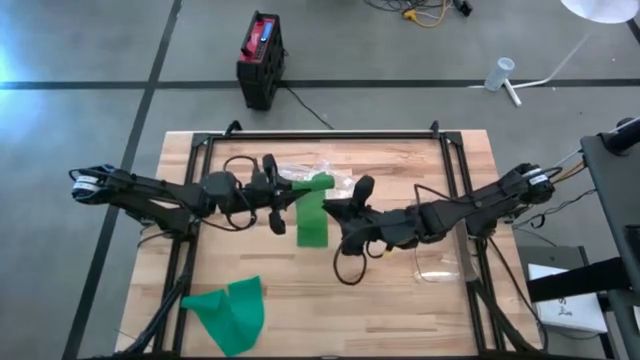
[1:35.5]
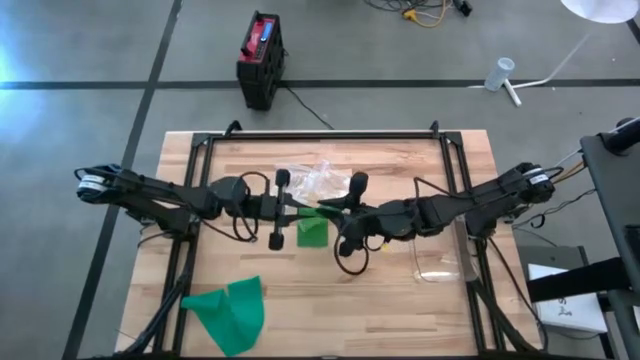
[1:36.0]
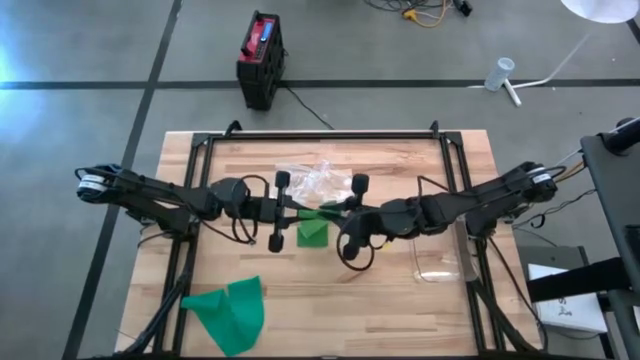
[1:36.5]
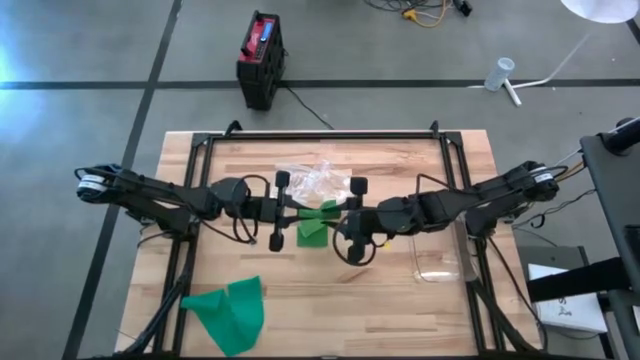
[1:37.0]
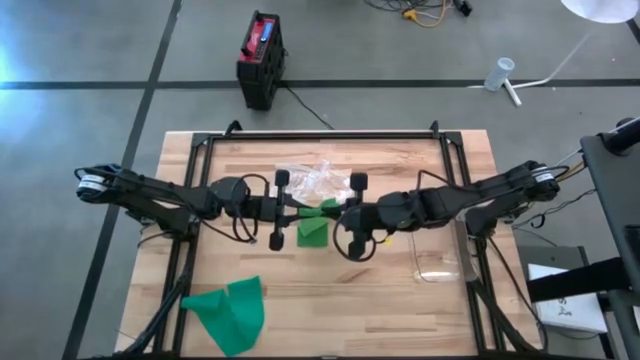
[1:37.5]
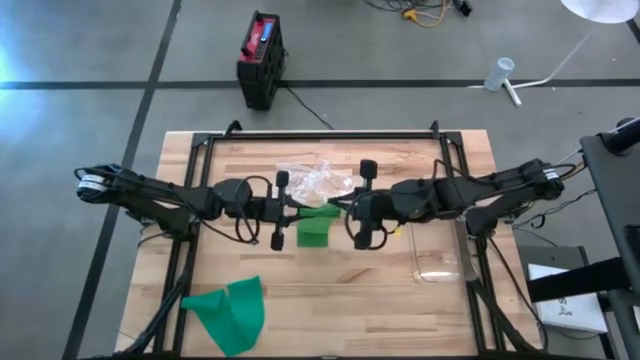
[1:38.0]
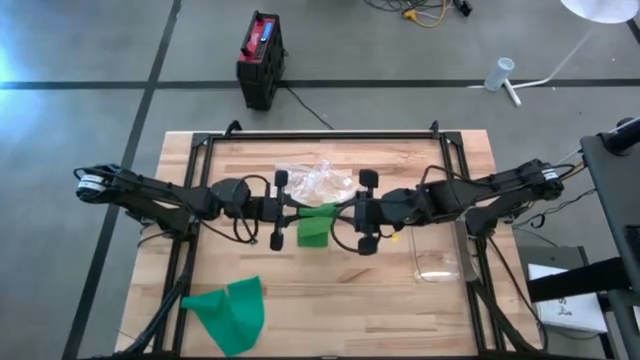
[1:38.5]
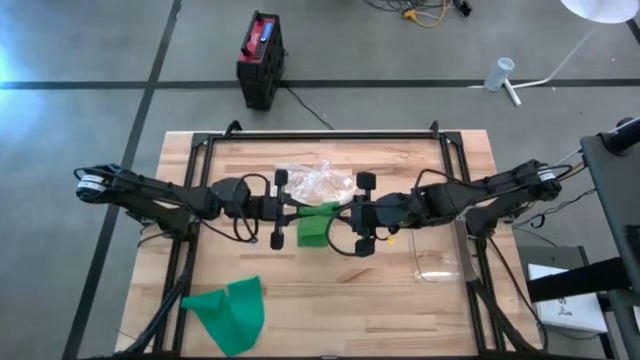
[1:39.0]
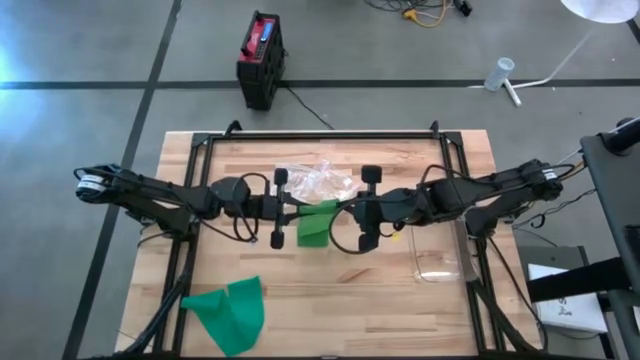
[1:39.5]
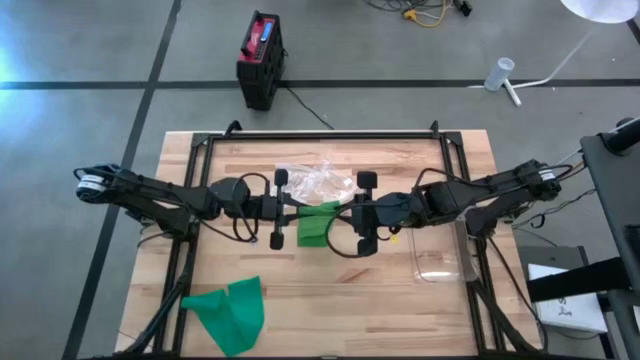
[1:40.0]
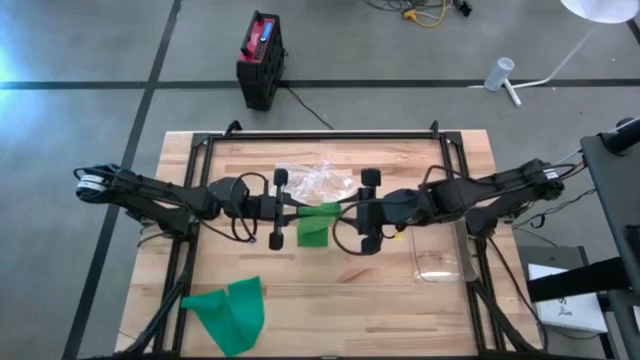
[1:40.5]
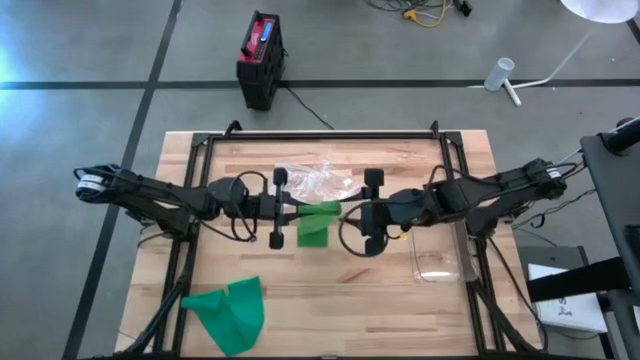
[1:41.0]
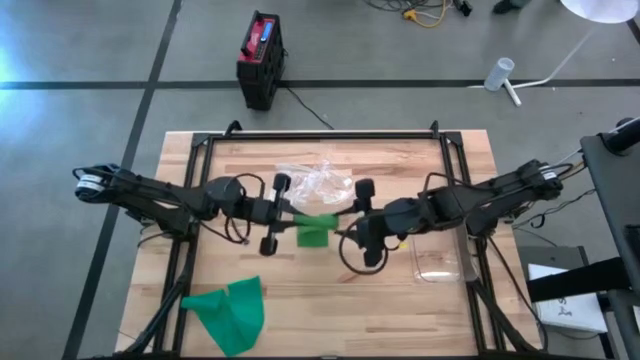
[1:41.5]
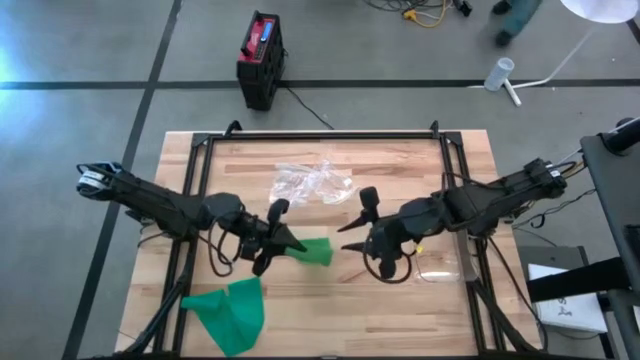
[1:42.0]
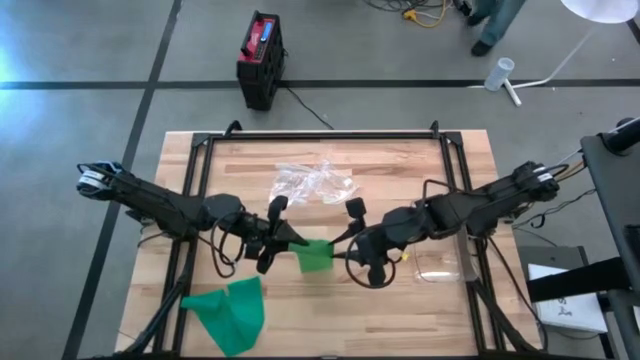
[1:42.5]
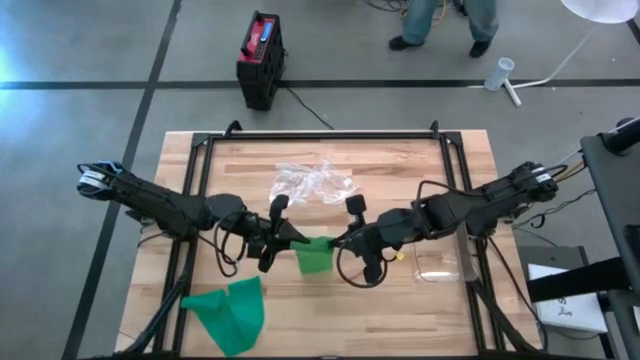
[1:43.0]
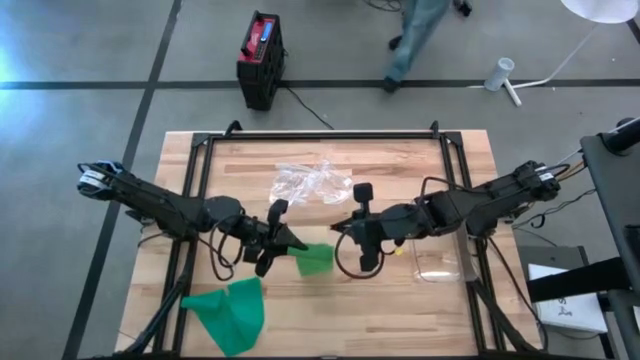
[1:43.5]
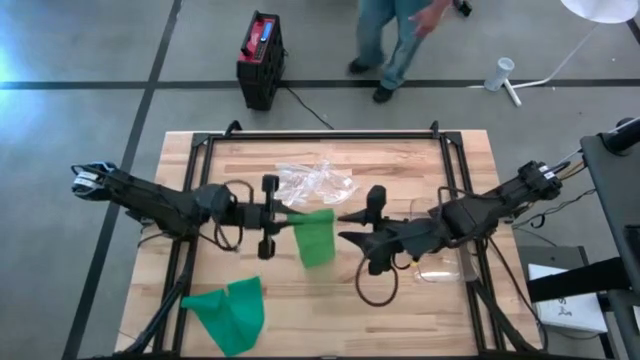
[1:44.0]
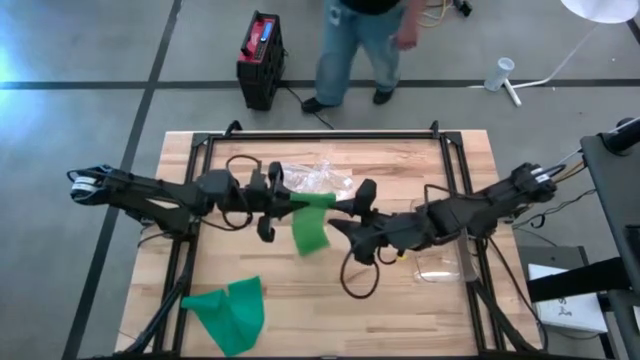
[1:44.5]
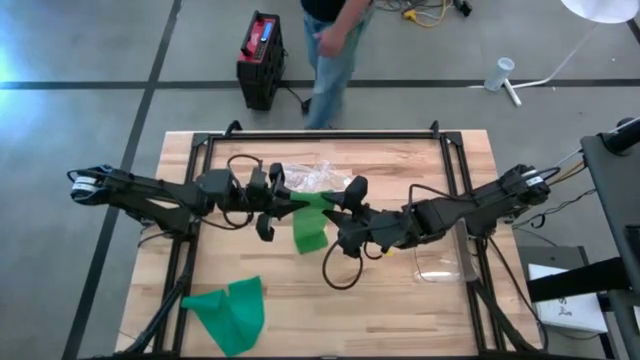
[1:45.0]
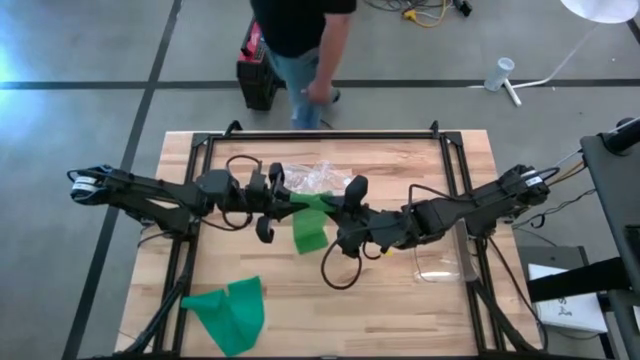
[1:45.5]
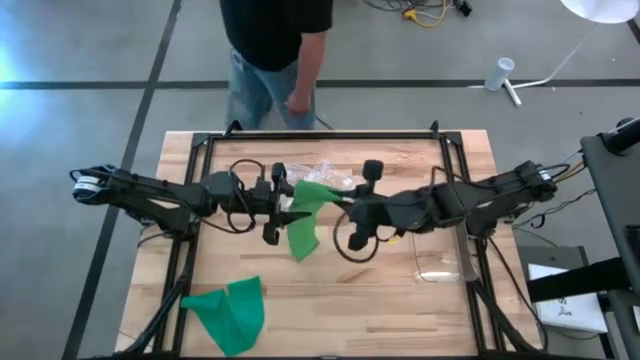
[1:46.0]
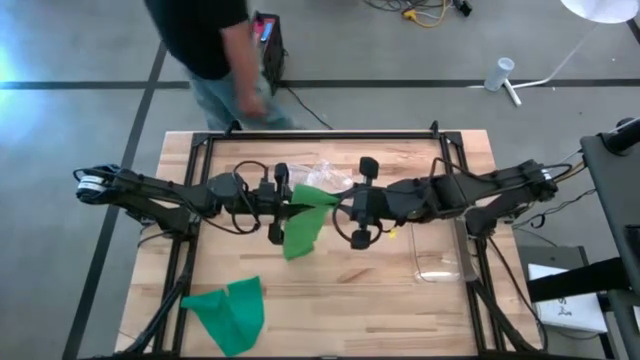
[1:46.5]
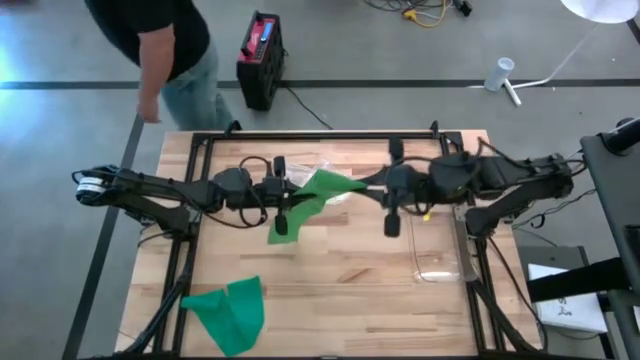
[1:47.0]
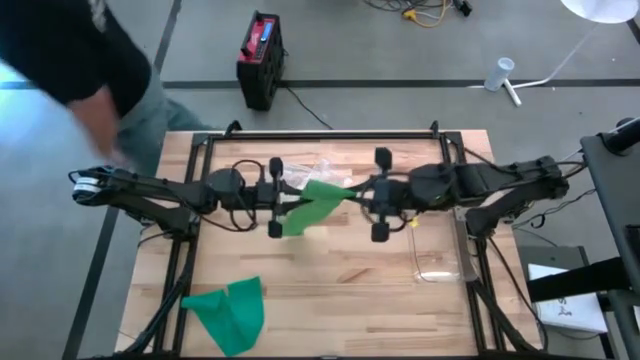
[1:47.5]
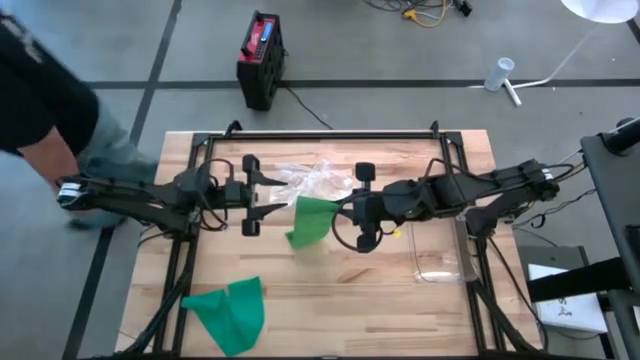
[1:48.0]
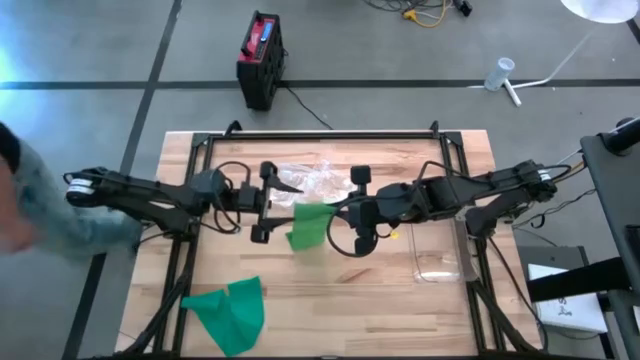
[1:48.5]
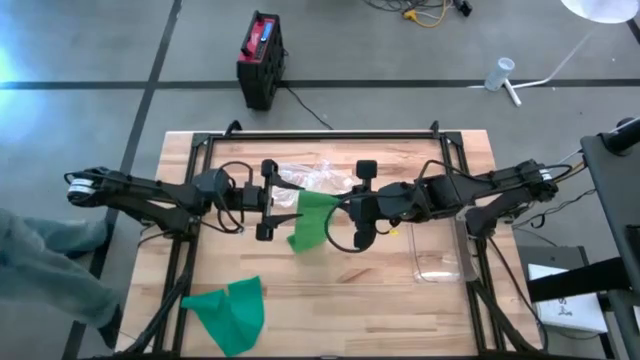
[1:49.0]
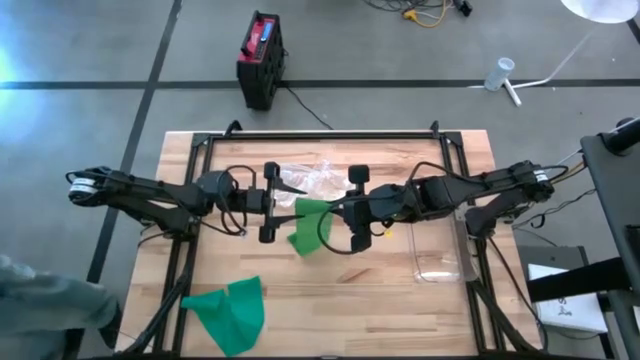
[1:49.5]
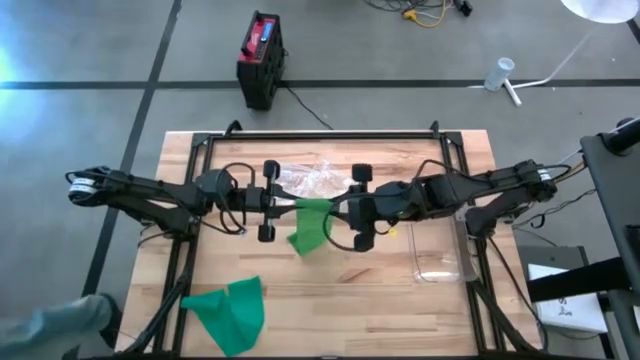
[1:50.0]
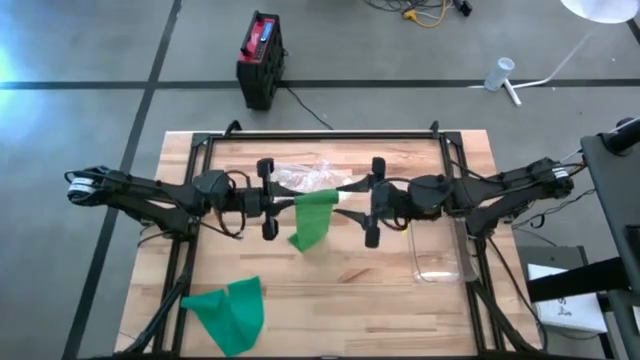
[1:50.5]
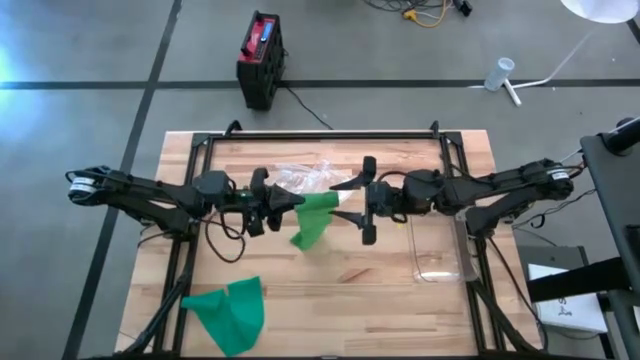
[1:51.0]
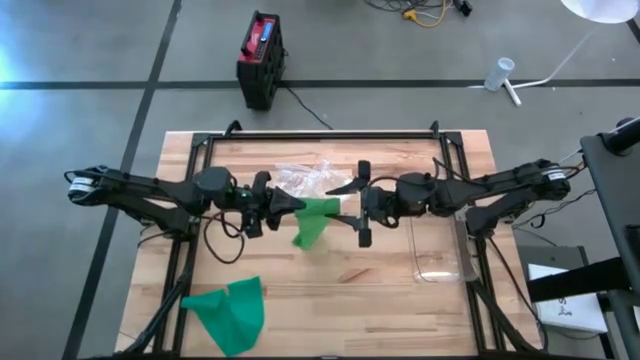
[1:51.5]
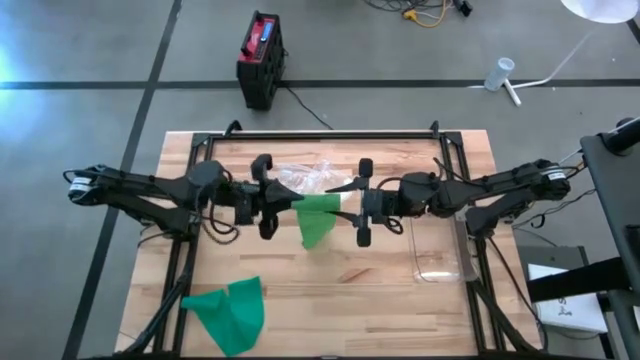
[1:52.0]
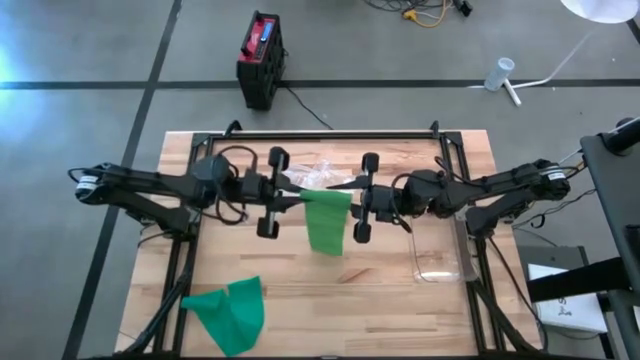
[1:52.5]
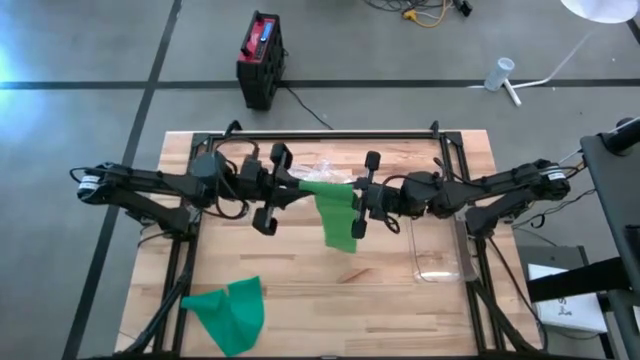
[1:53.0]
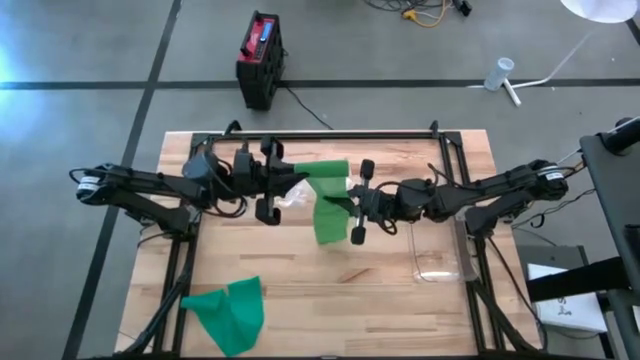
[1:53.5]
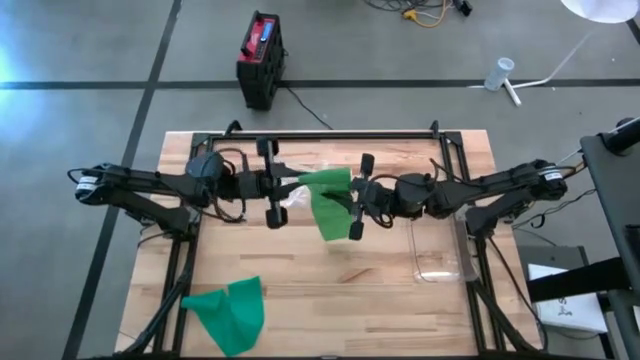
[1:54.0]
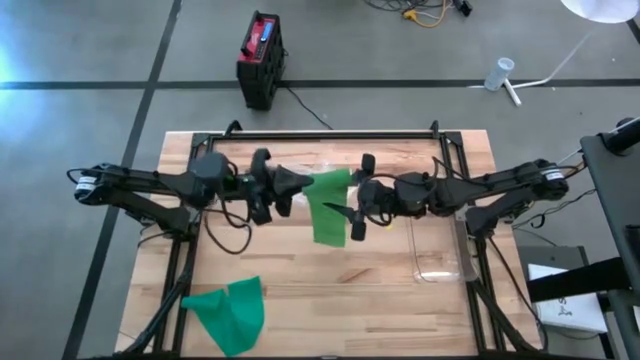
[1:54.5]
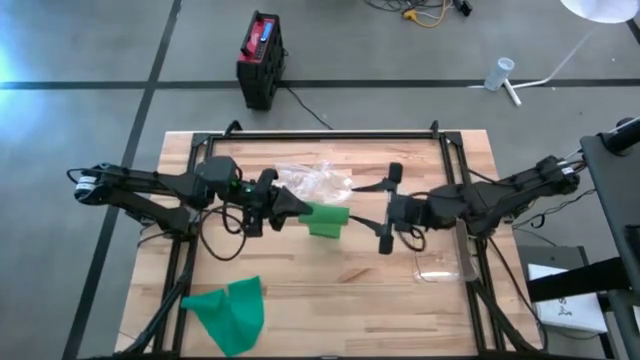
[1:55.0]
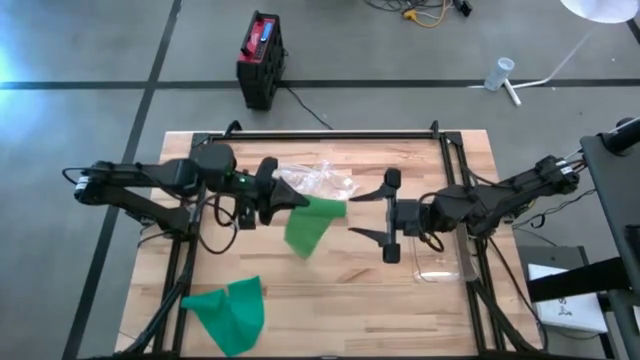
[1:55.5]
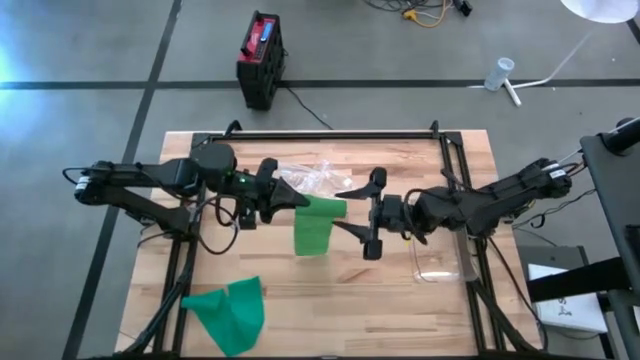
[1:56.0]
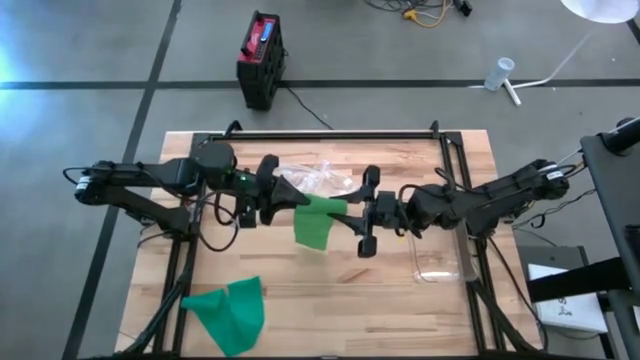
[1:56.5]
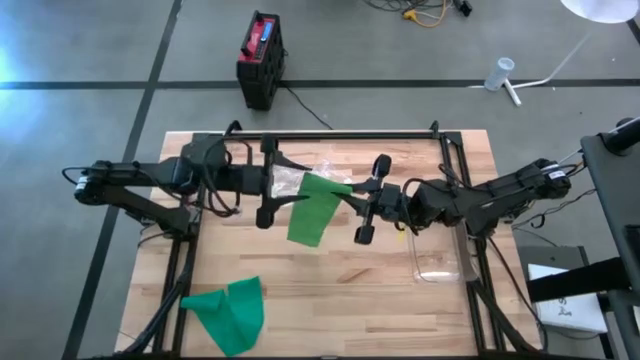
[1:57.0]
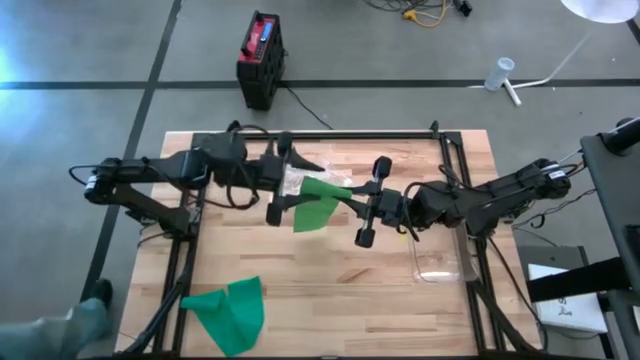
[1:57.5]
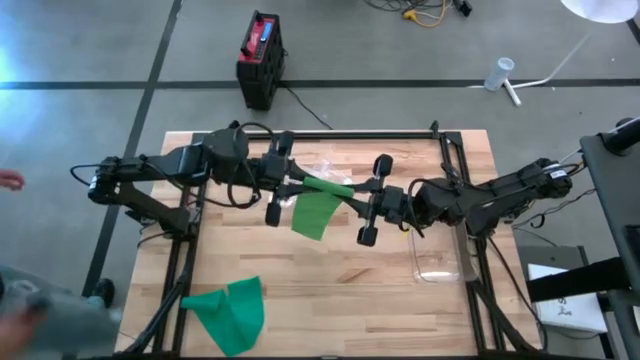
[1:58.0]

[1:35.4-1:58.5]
Task: Roll bandage
Roll the green bandage
